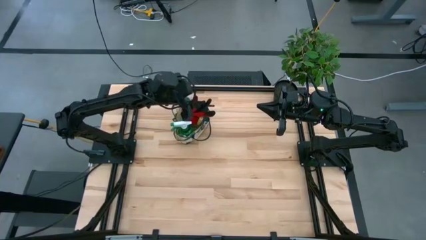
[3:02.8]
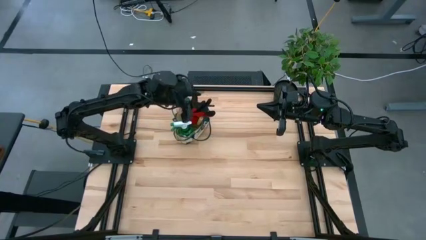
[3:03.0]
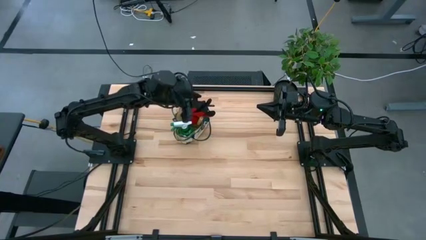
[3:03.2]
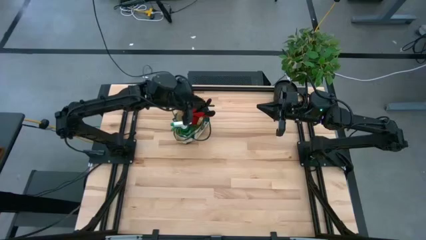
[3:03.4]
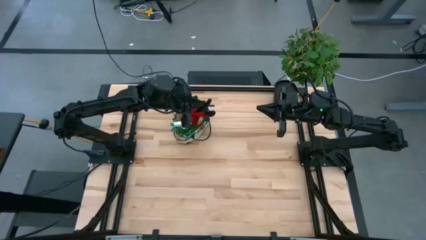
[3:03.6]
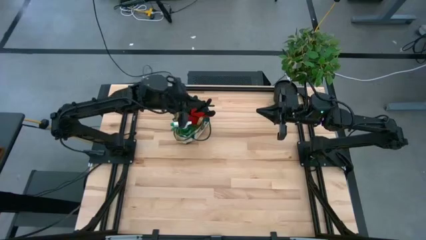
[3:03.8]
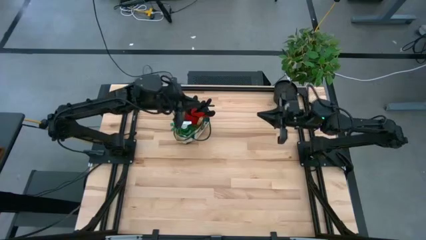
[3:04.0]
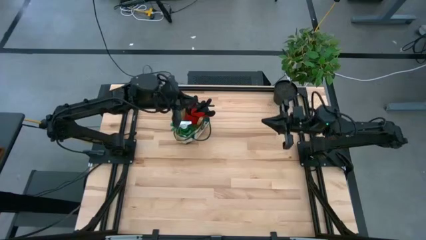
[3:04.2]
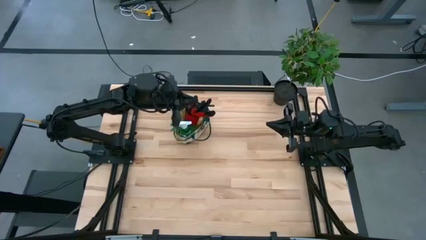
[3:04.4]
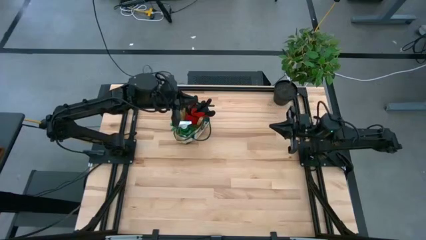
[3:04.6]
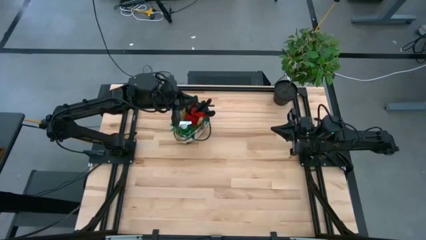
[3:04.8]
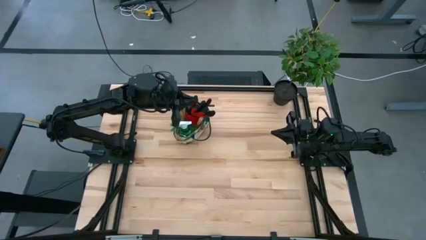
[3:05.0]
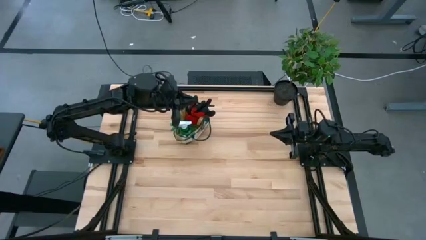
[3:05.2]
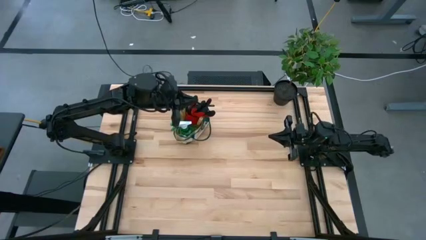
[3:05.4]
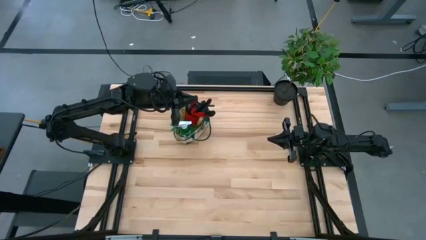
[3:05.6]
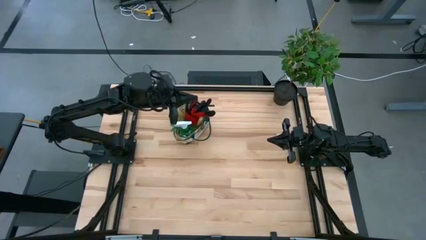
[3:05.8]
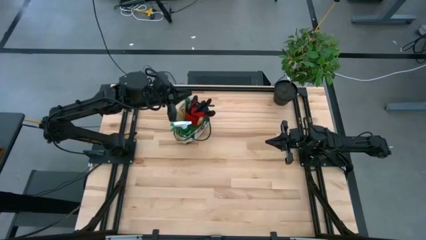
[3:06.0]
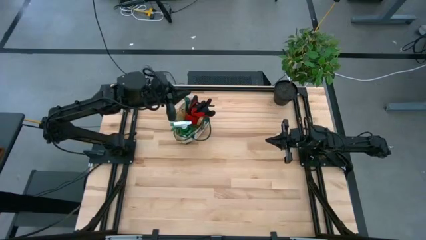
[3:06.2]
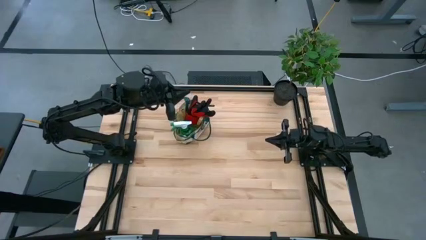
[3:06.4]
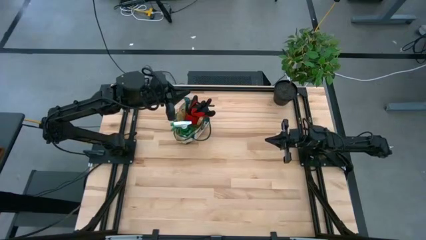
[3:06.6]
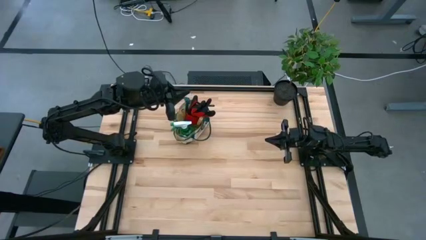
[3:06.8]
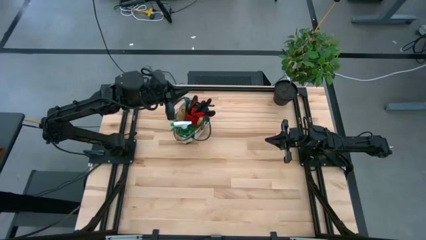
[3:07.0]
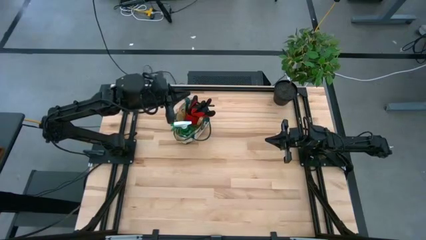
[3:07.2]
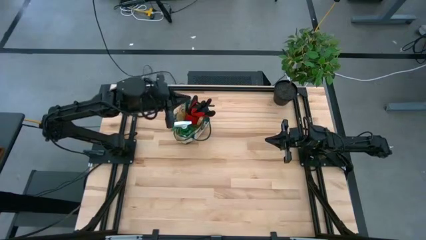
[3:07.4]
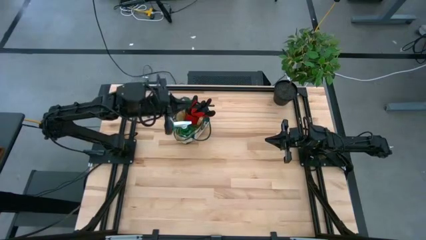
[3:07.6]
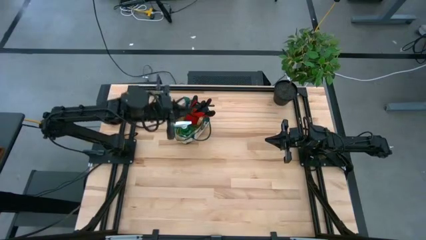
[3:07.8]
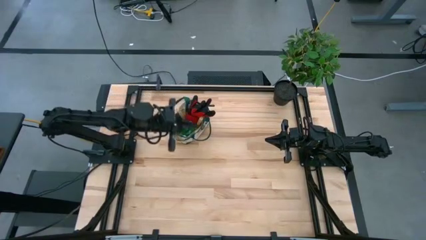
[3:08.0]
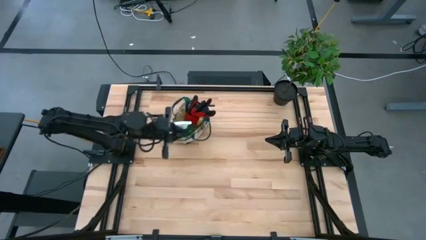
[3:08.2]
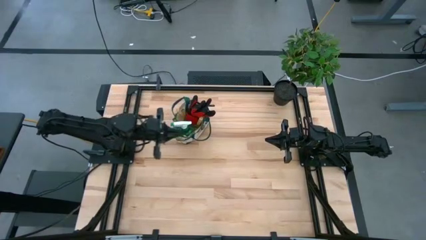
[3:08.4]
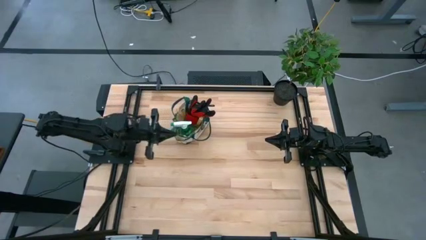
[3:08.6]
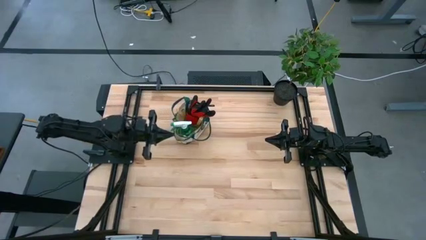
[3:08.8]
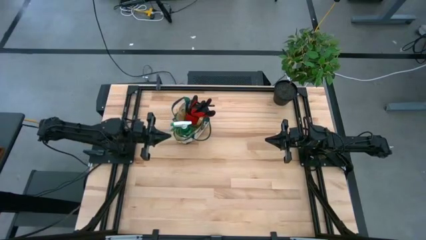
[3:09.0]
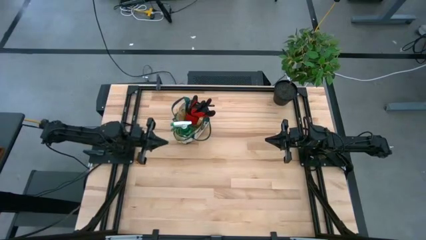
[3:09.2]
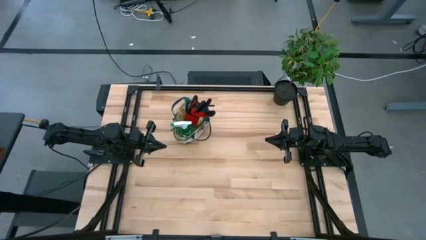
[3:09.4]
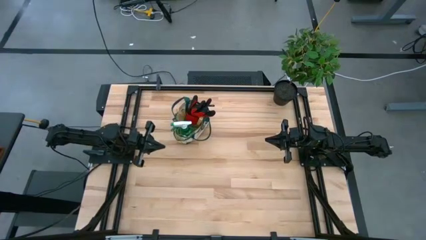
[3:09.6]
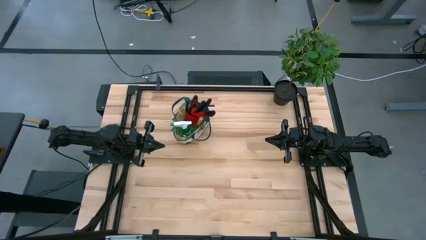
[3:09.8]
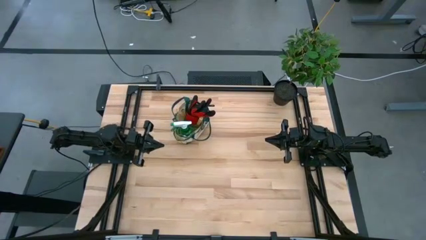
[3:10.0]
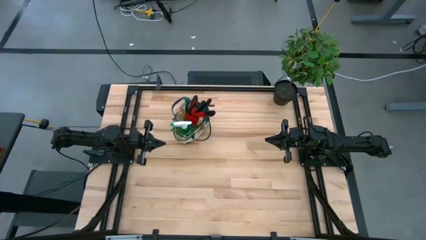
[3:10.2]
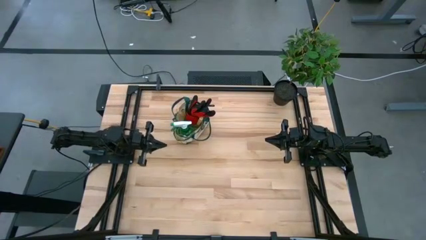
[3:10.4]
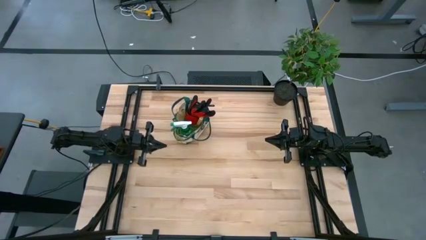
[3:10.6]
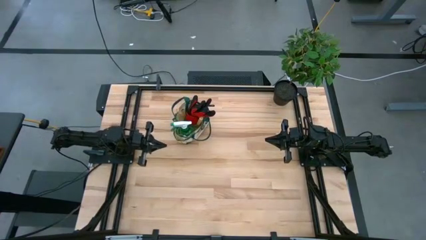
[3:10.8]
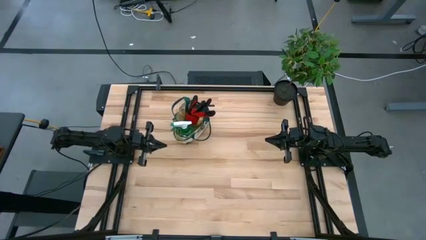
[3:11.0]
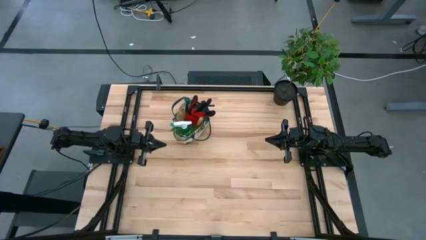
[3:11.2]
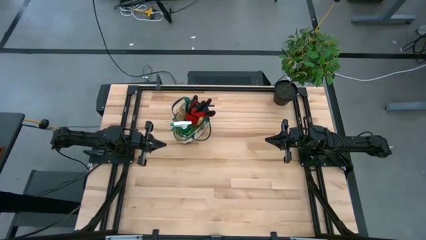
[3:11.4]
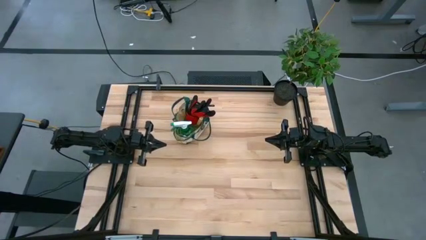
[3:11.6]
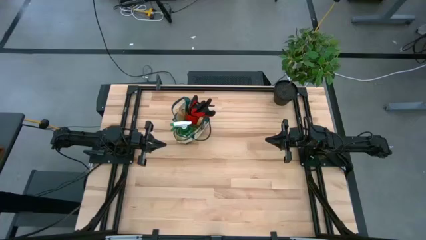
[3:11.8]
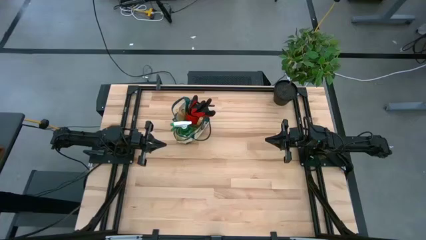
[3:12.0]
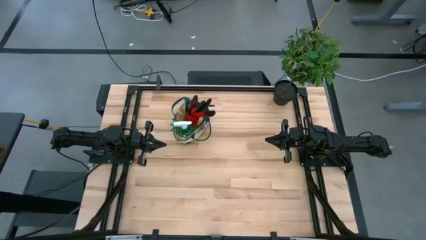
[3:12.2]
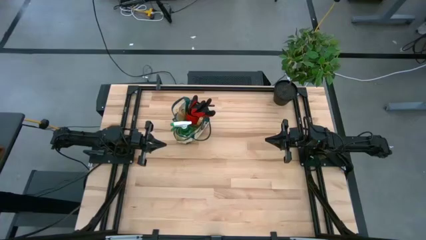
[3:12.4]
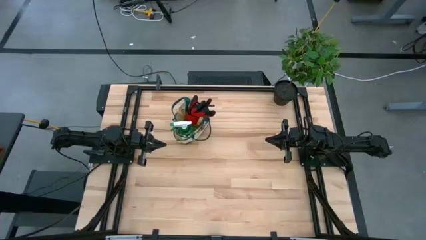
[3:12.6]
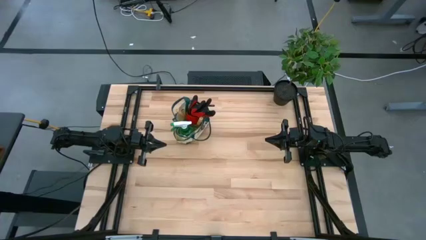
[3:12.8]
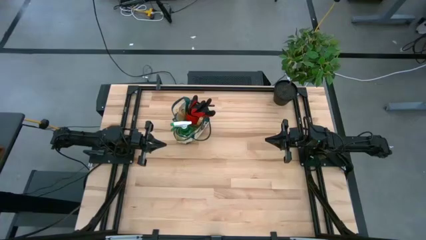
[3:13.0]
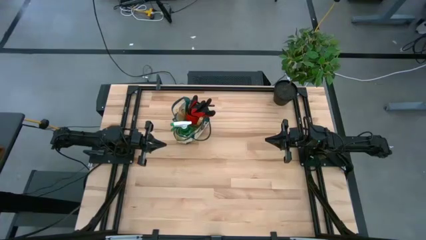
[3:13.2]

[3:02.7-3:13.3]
Task: Pick & Place Garden tools in Gardening bag
Return to Home Position
